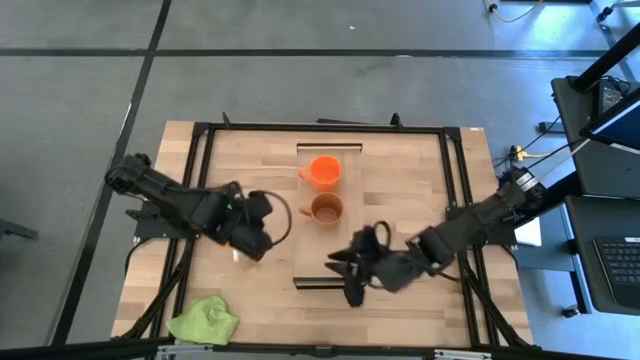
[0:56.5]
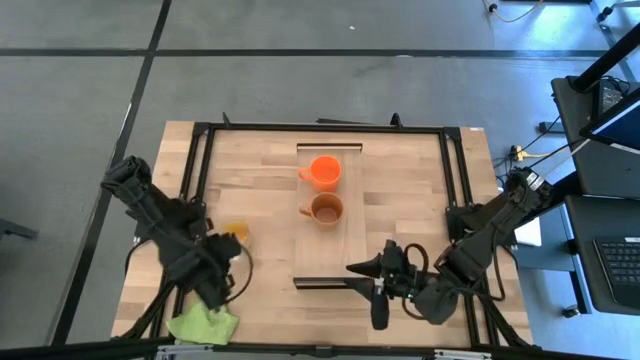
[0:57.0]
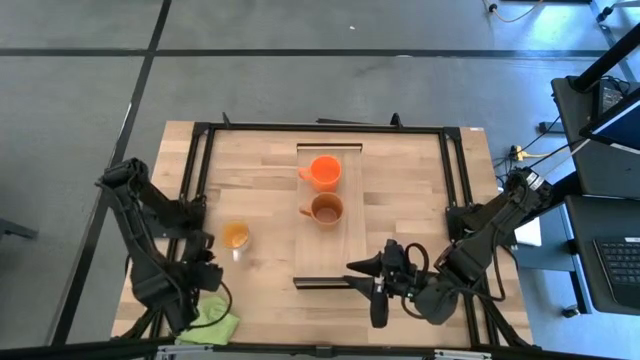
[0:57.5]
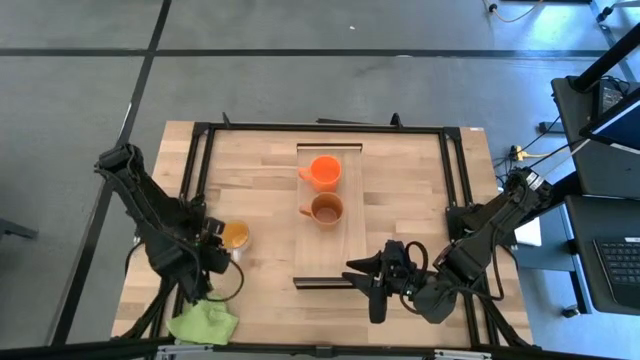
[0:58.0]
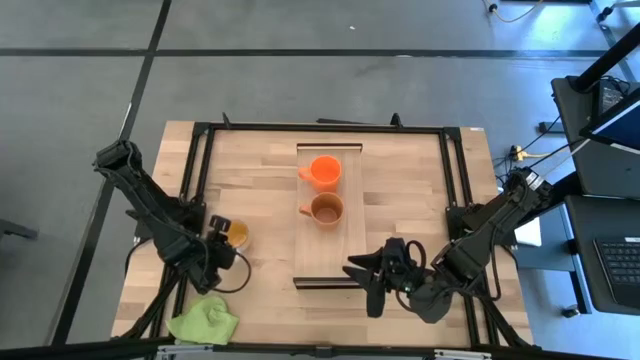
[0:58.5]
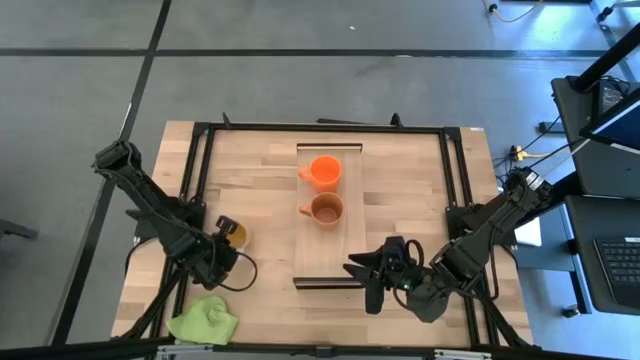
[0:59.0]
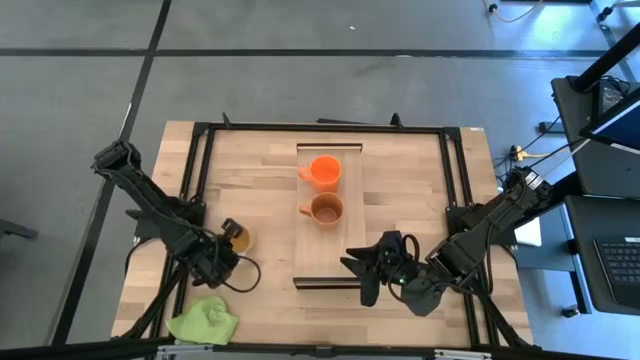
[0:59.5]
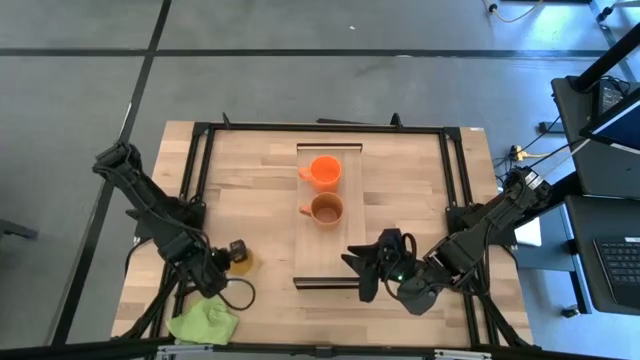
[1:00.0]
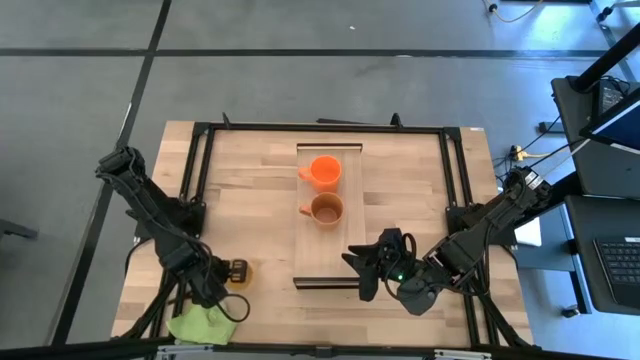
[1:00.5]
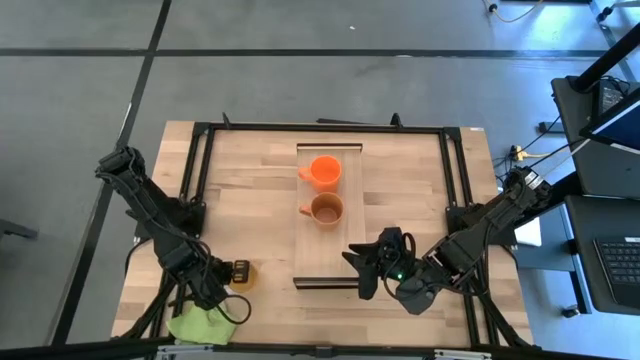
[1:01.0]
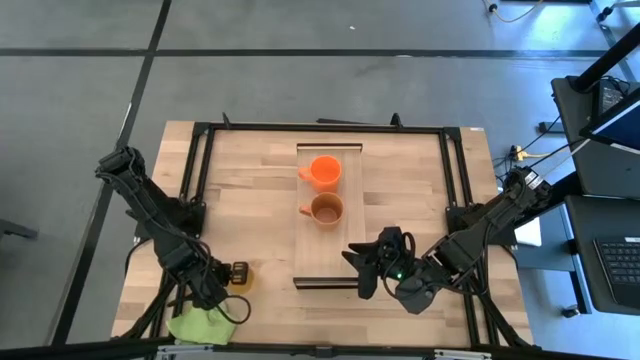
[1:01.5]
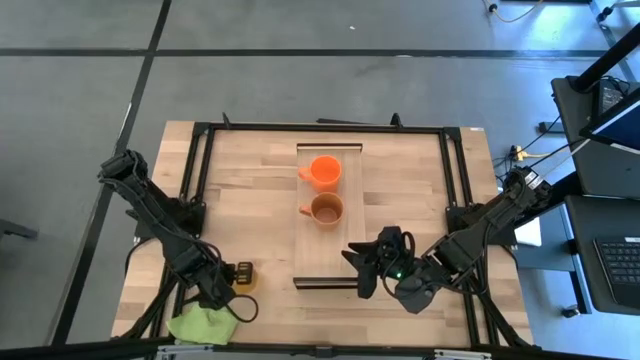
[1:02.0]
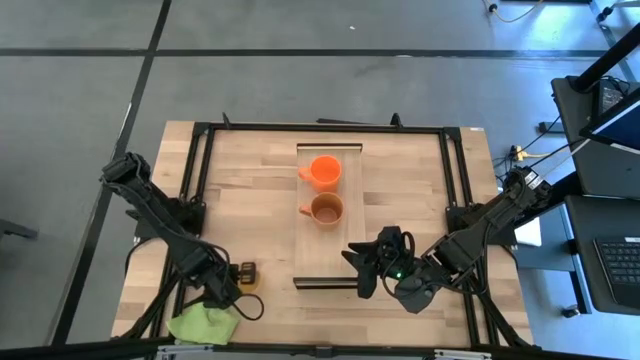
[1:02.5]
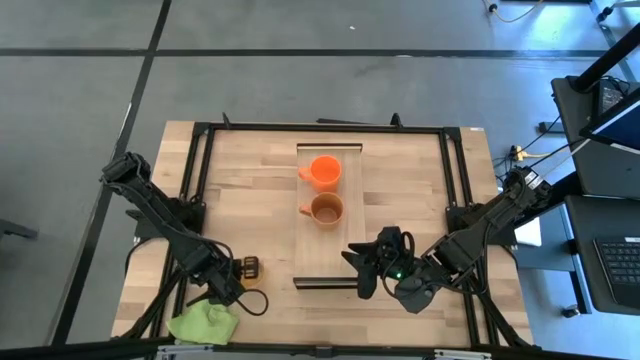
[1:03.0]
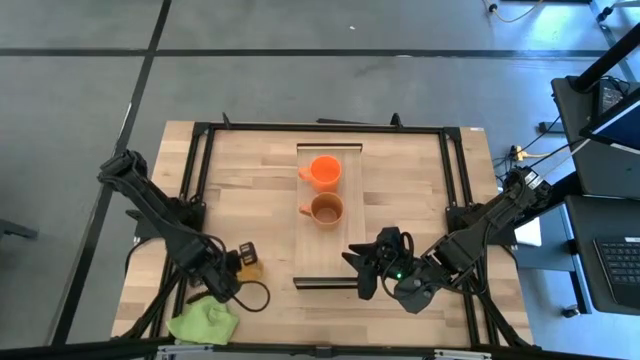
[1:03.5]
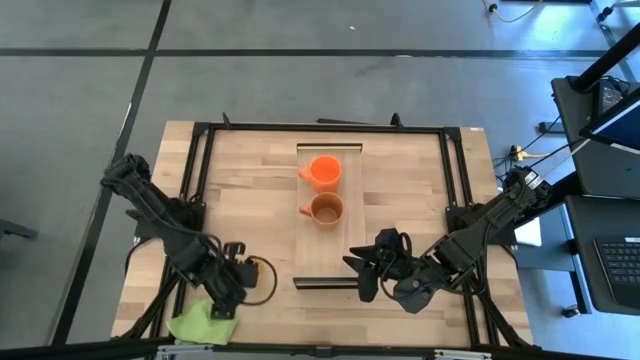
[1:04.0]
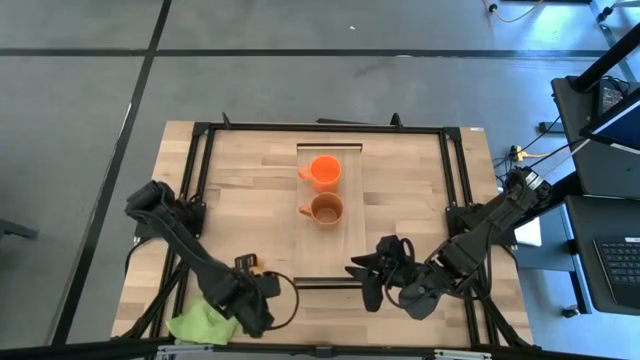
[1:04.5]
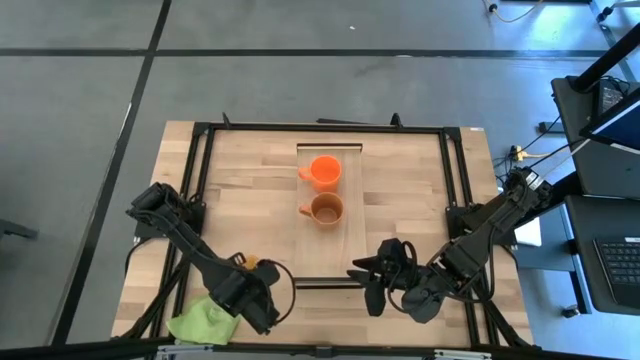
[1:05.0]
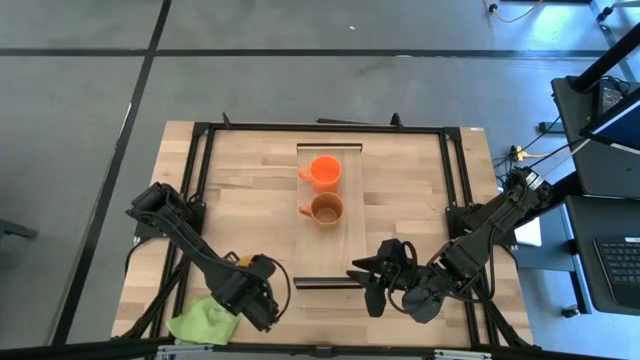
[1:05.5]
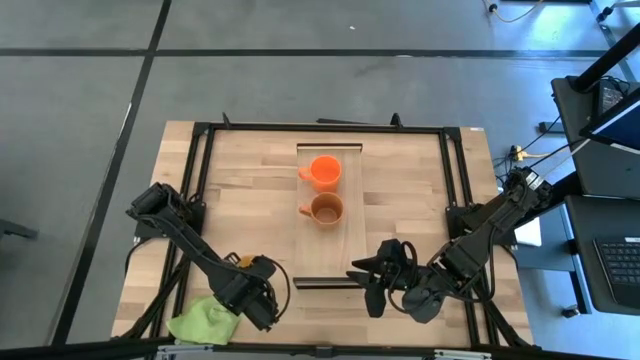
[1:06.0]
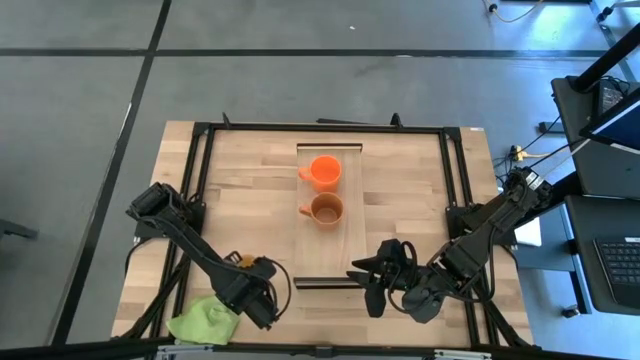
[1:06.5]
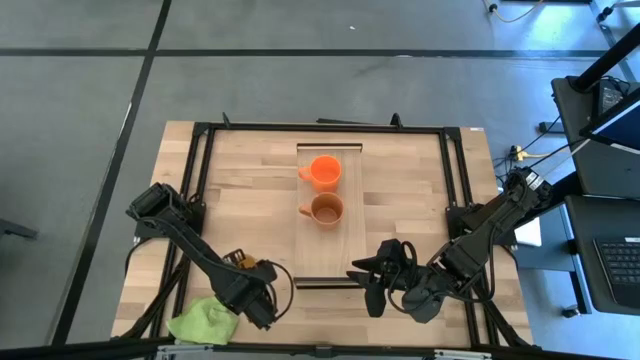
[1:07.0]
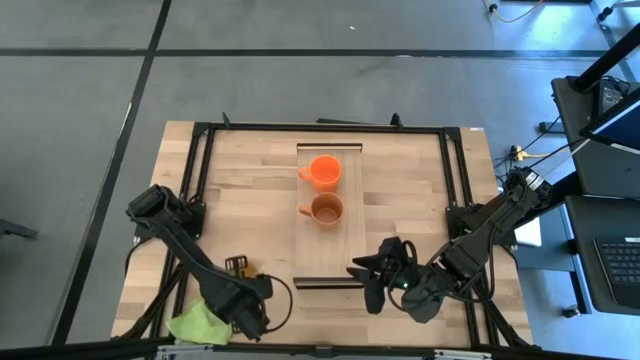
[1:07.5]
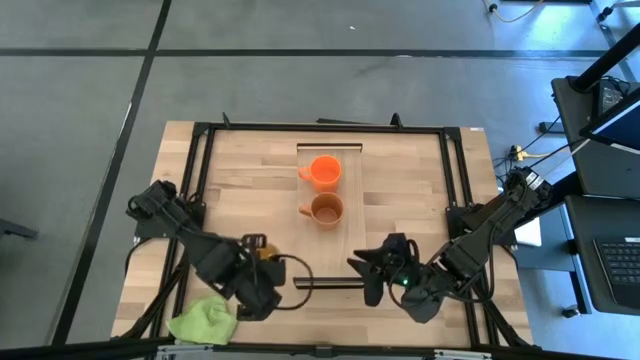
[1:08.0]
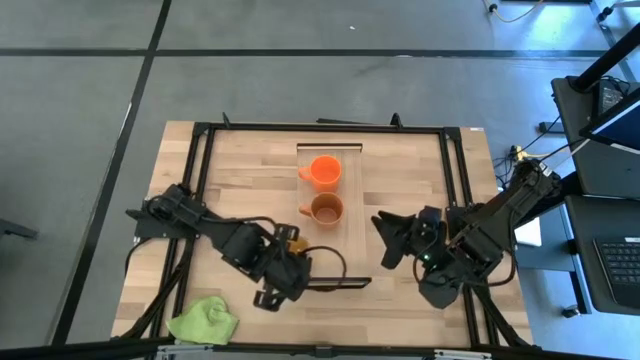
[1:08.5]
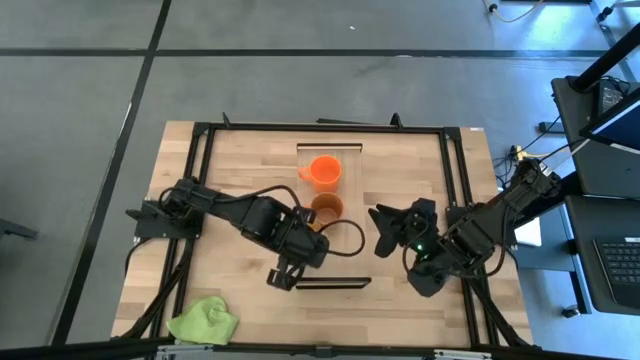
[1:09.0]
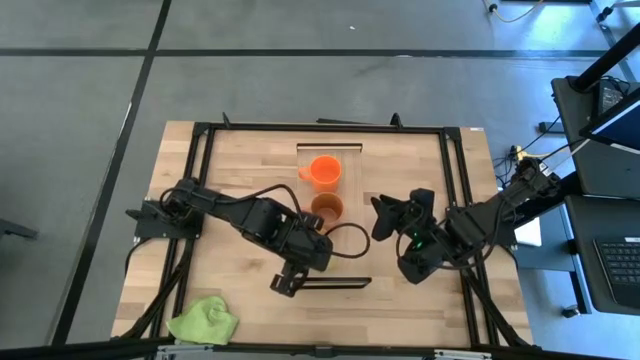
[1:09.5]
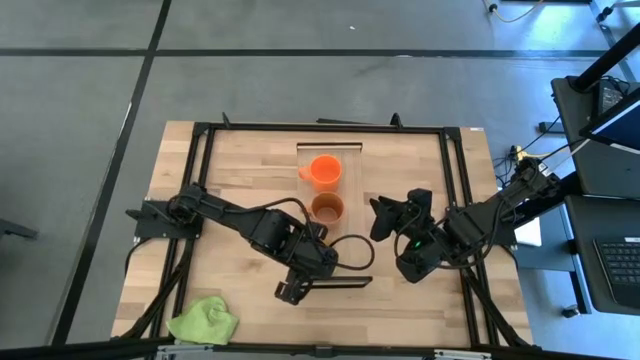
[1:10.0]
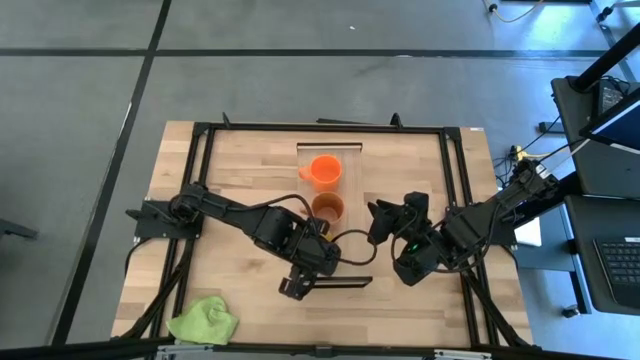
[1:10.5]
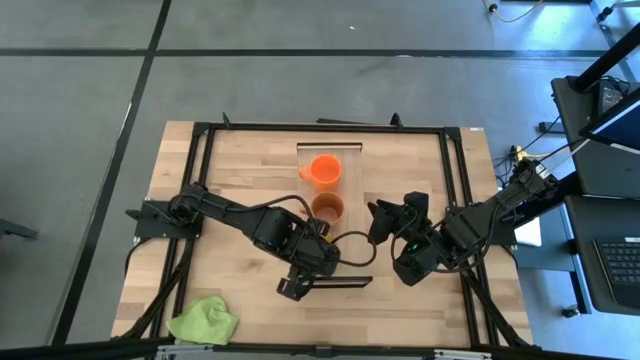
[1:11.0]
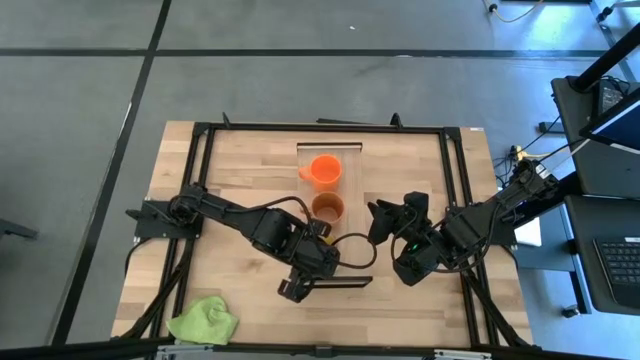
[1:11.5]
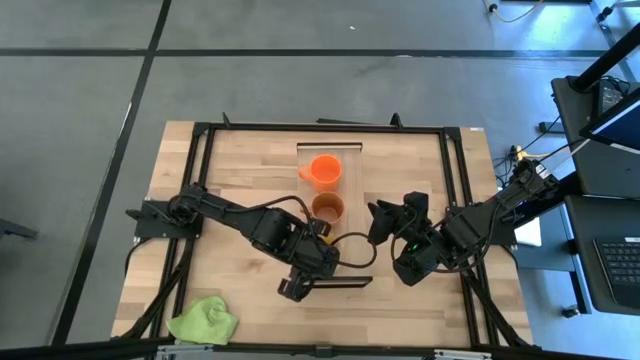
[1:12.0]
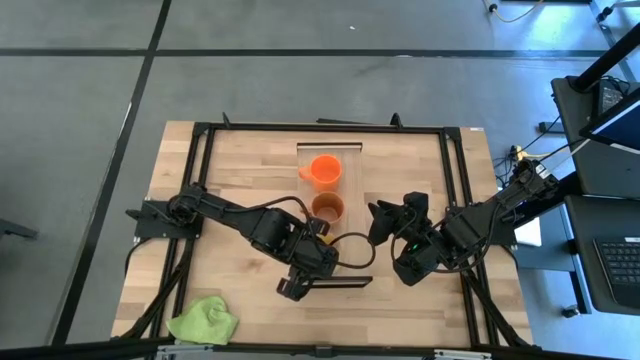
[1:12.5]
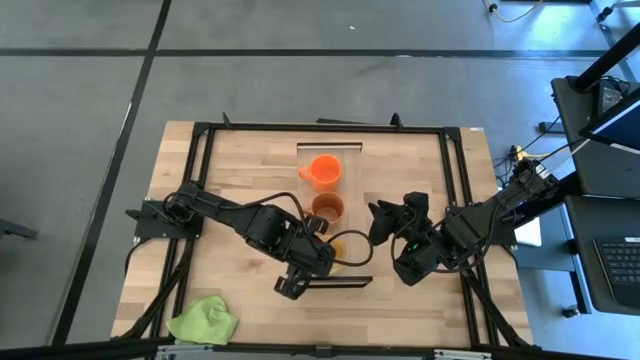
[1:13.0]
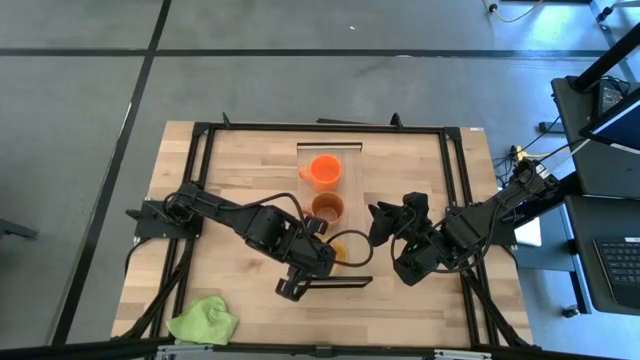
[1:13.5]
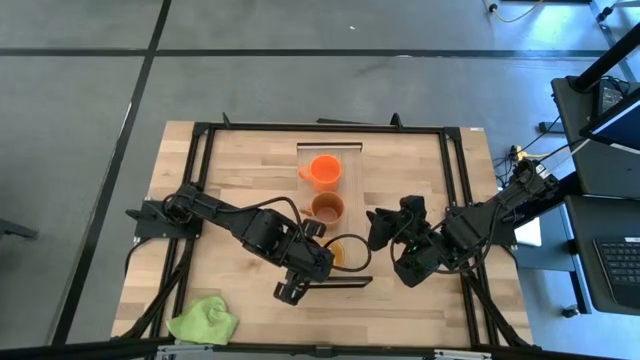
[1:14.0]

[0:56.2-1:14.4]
Task: Stack small to large cups/mugs on shelf
Put the yellow mug on the shelf

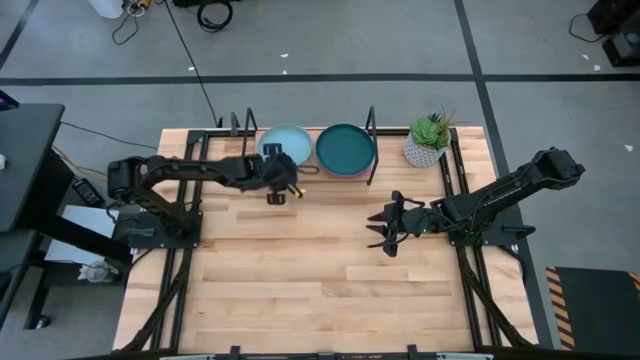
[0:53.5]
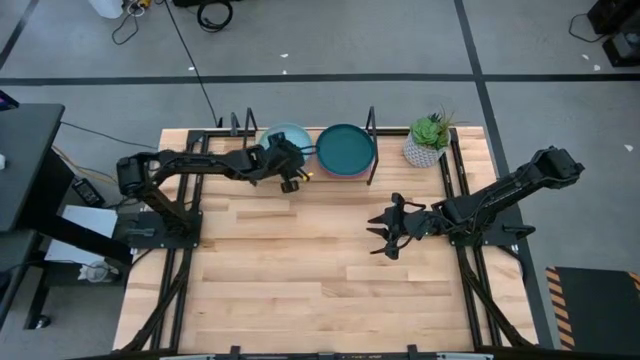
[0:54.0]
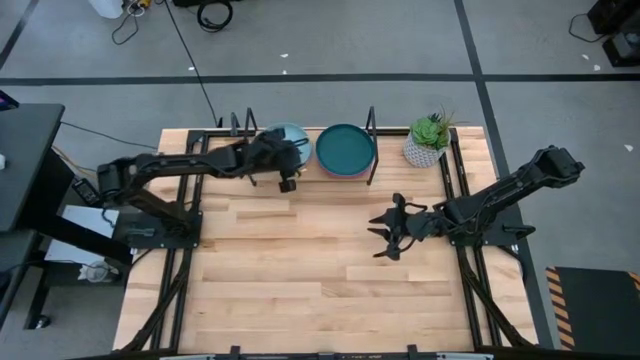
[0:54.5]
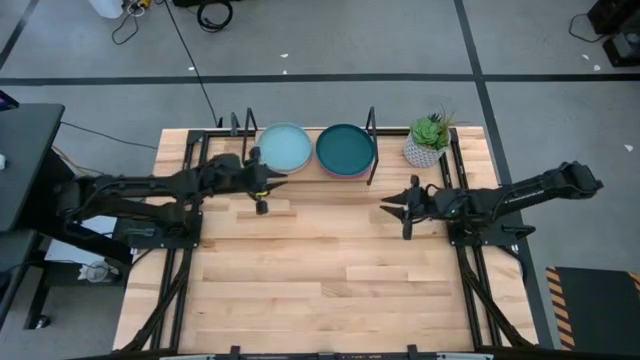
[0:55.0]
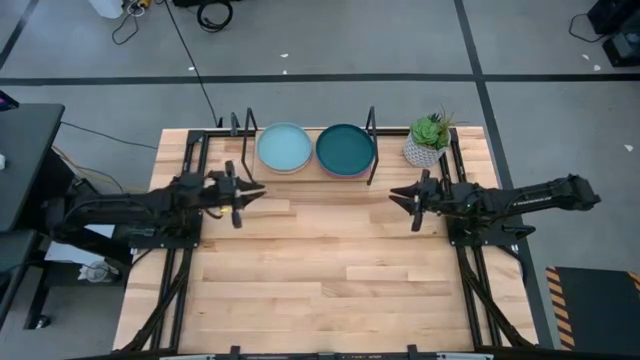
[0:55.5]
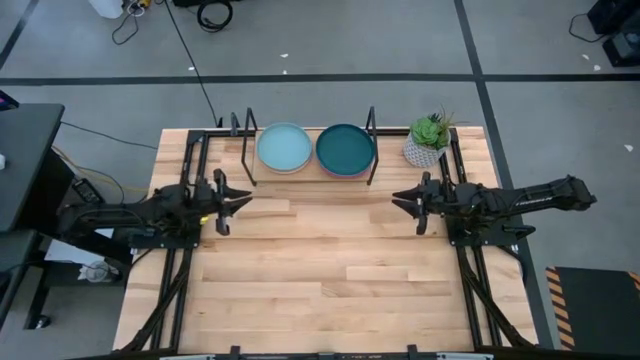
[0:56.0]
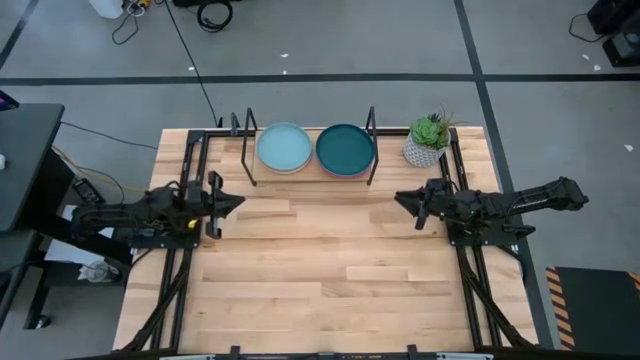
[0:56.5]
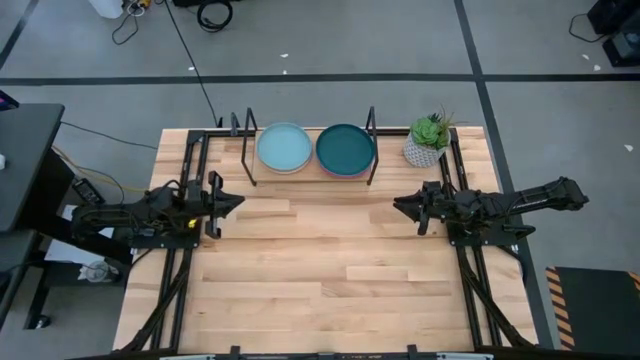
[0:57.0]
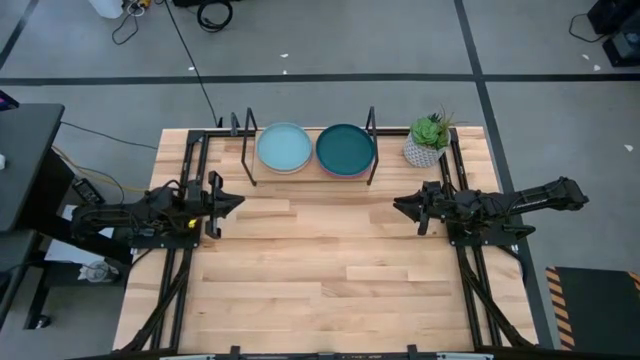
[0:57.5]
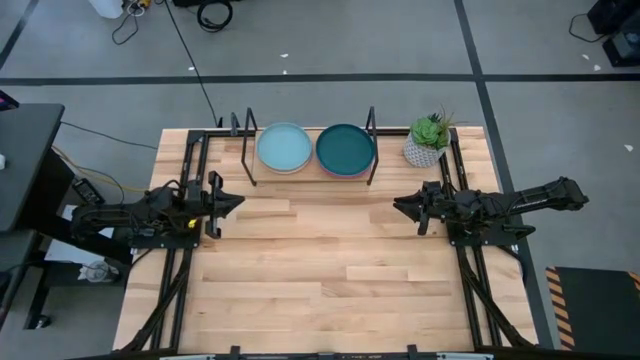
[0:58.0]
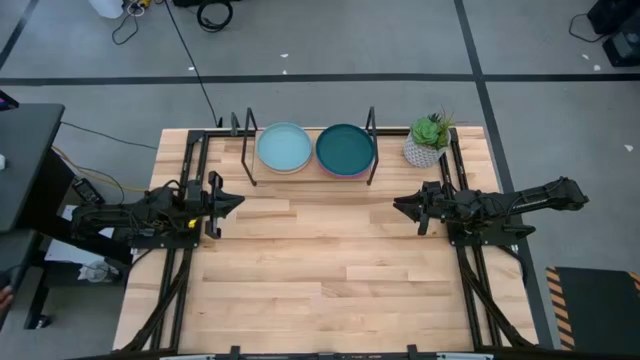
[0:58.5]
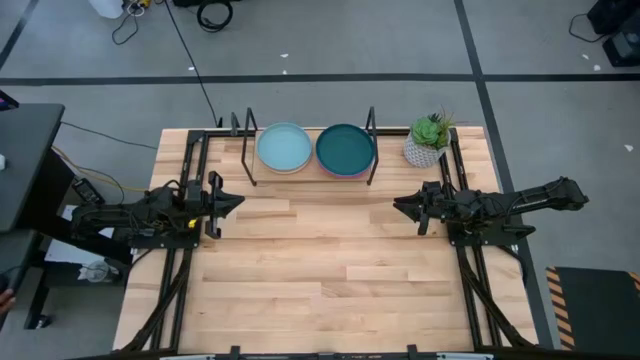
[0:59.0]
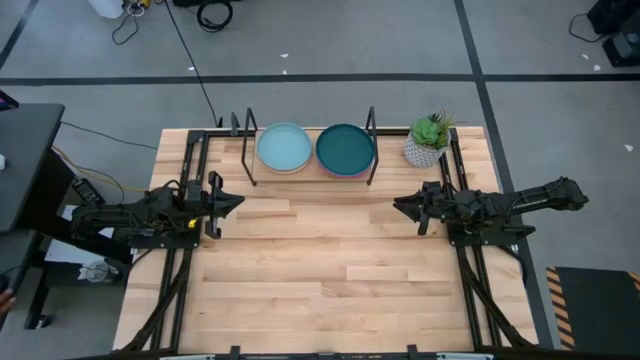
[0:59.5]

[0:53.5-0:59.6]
Task: Place and stack plates onto a shelf
Return to Home Position
